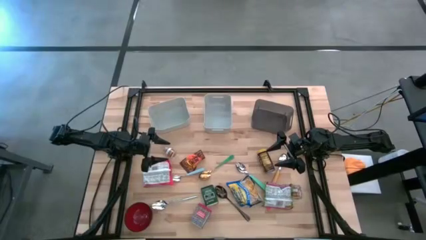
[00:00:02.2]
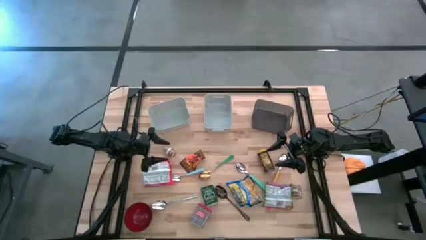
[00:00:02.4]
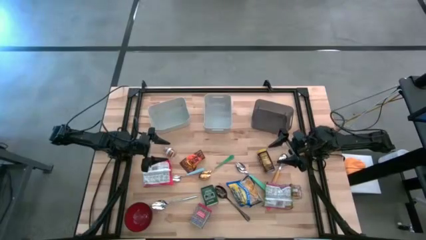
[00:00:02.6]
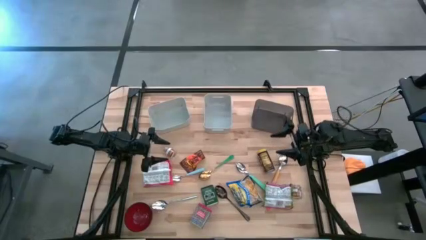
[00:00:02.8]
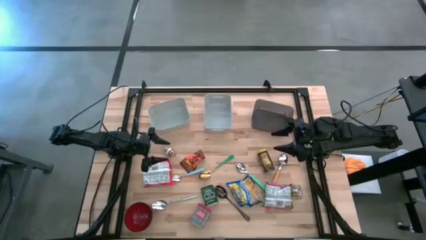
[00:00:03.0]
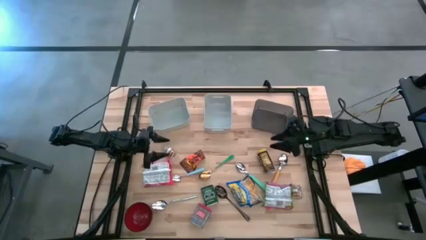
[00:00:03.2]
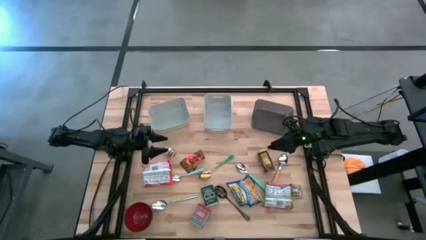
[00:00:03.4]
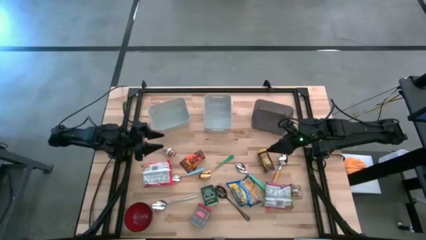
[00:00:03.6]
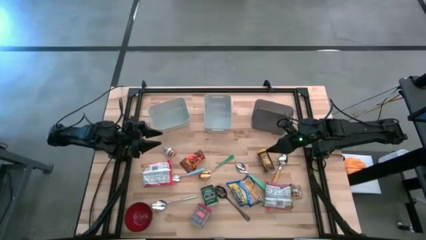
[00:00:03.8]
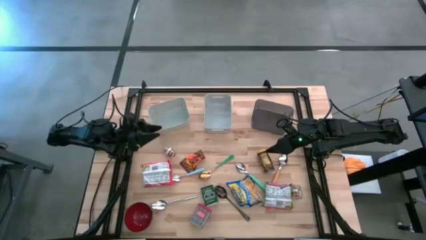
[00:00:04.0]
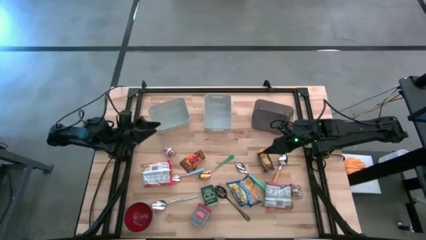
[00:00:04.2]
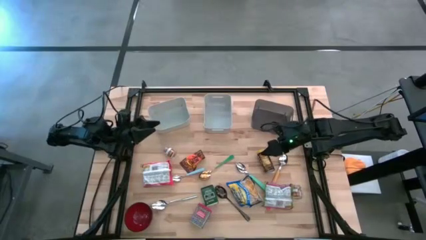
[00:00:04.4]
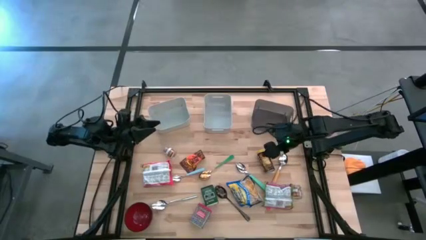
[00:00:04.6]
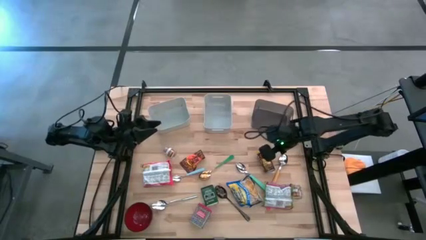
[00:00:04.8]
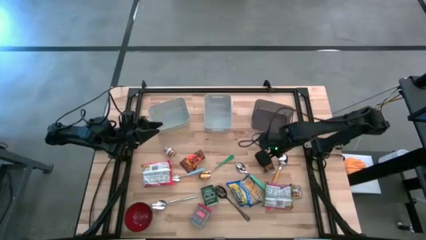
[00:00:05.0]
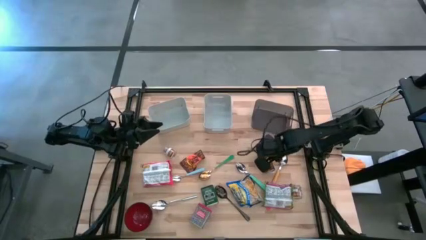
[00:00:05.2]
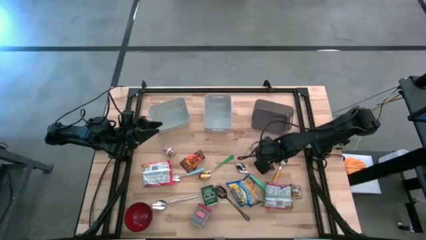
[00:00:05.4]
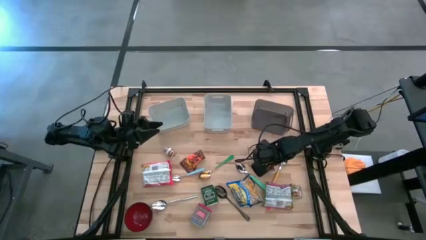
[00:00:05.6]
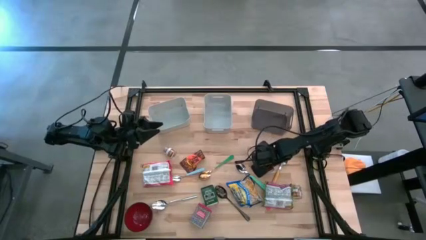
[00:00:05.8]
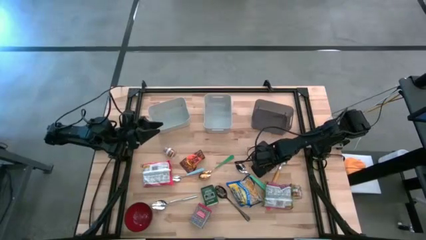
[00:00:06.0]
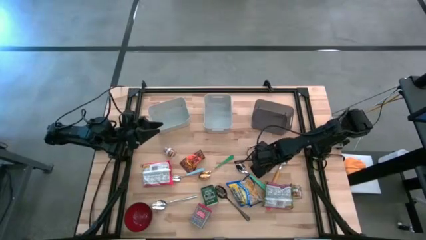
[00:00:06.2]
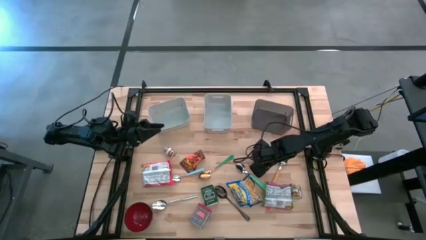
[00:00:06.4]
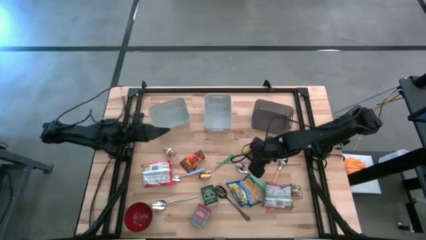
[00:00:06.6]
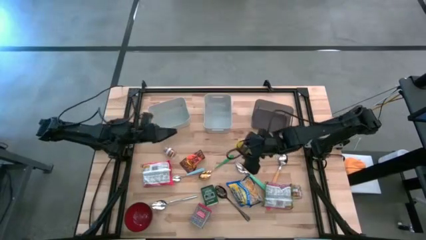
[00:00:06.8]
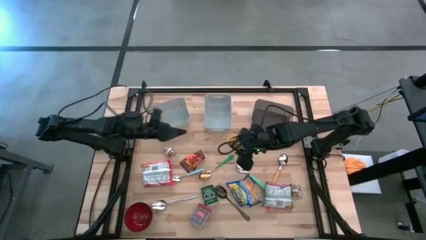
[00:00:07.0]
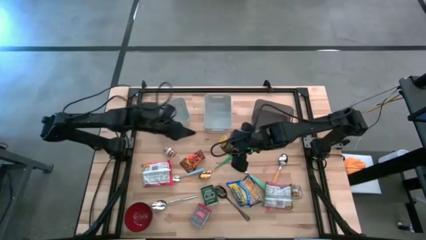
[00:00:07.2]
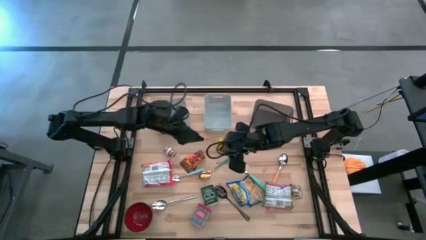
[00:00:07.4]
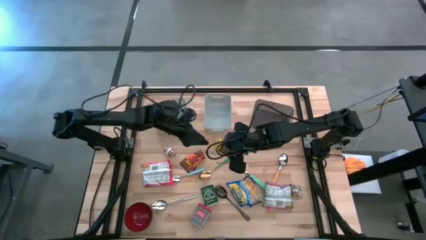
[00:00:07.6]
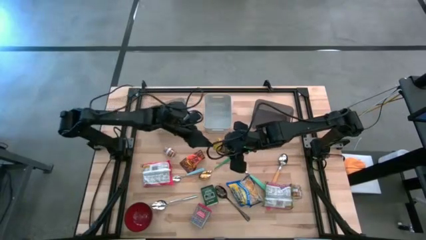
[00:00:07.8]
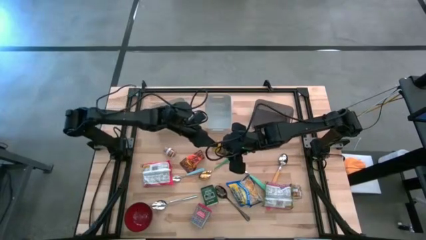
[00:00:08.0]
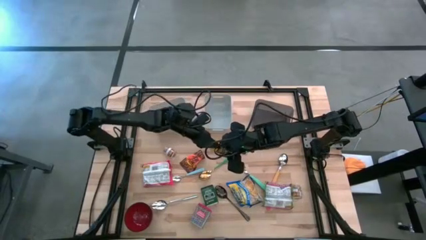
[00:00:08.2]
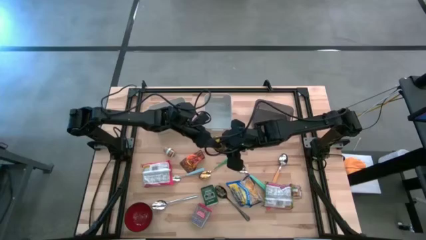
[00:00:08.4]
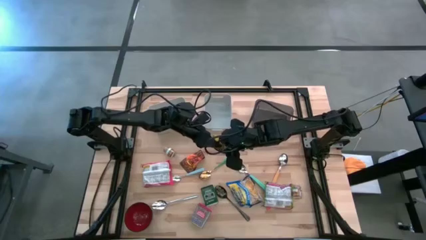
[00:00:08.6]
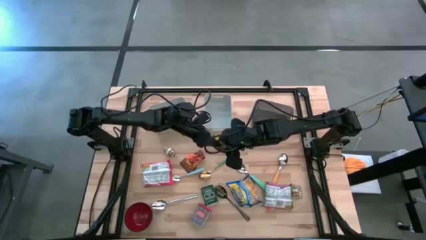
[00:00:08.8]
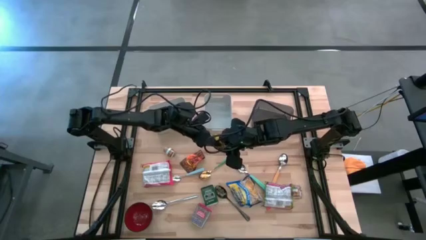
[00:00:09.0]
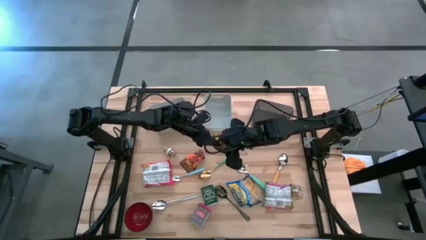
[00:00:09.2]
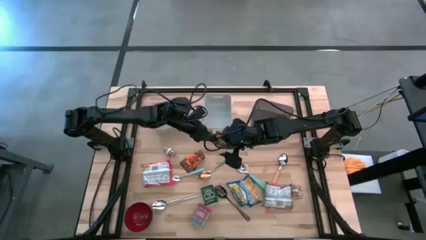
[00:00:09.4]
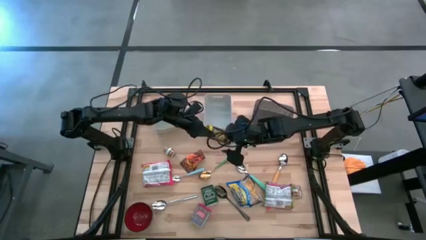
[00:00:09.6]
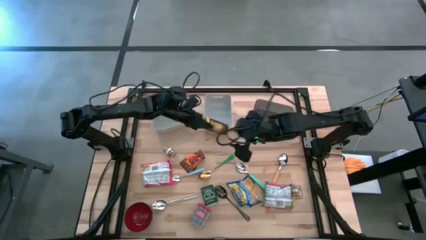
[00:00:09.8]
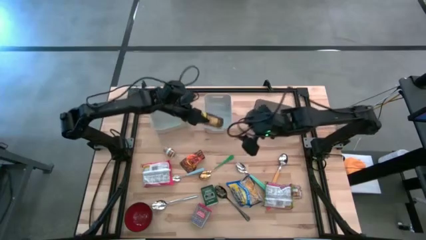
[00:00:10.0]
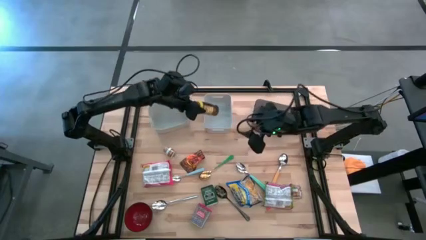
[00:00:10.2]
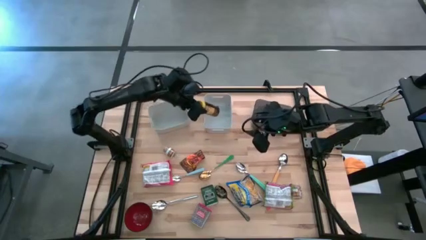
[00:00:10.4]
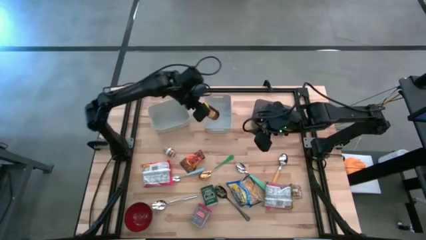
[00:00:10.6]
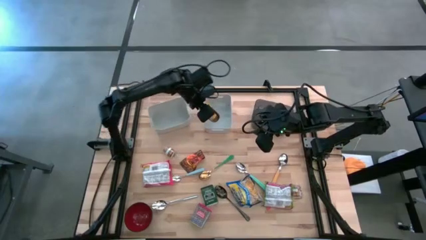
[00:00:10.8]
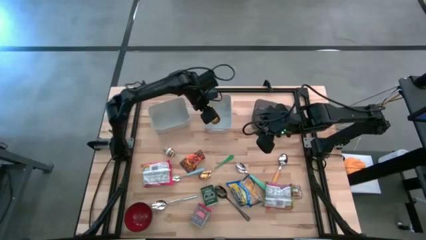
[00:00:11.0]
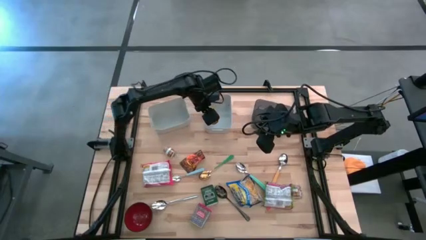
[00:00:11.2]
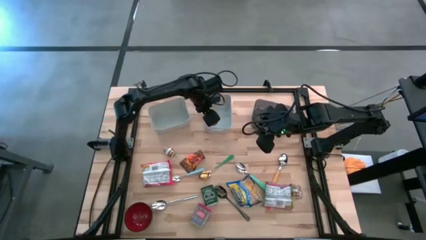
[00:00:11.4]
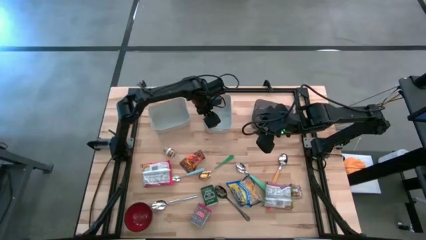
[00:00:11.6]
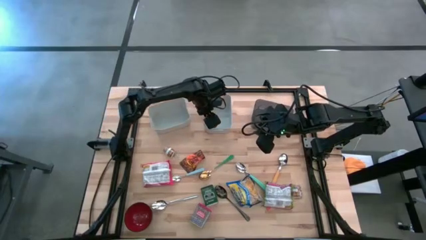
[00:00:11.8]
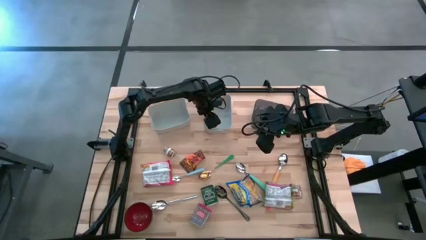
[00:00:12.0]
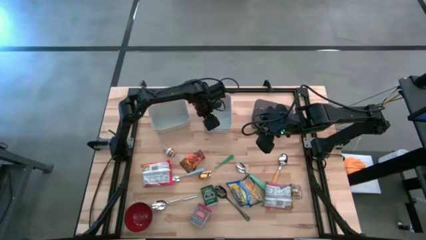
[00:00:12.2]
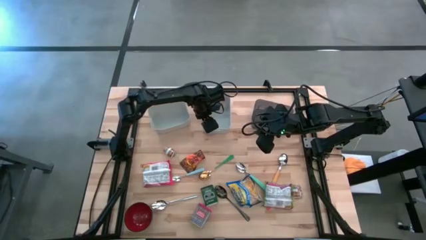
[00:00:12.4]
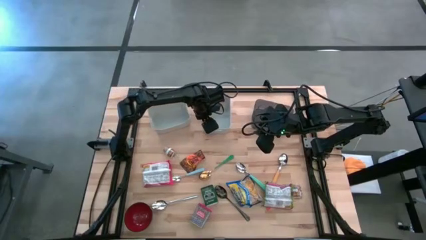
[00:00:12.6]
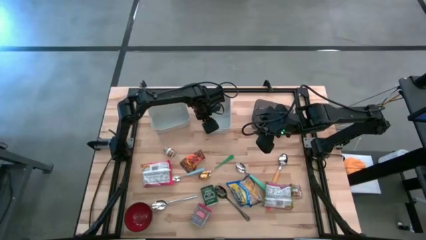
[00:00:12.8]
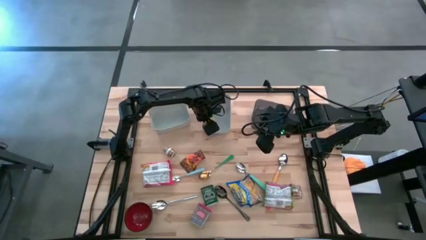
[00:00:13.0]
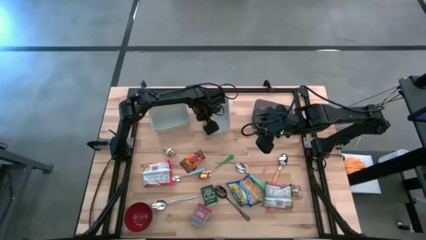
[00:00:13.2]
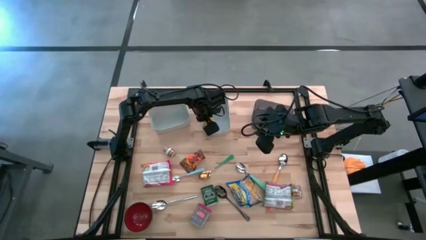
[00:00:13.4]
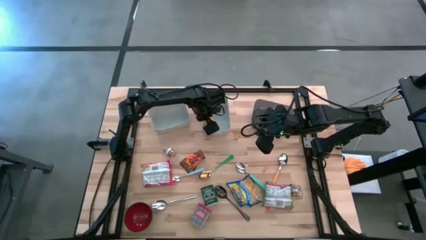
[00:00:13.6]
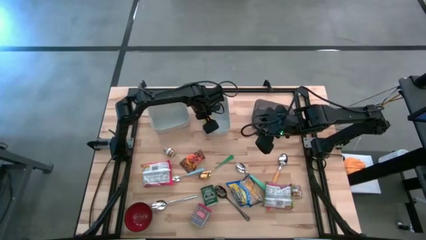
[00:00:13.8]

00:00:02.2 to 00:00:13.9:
Put the yellow seasoning can into the right gray bin
